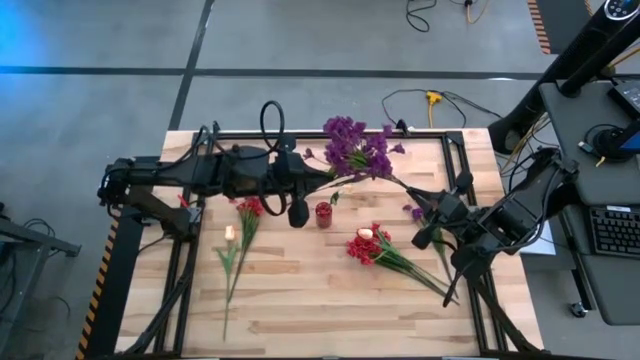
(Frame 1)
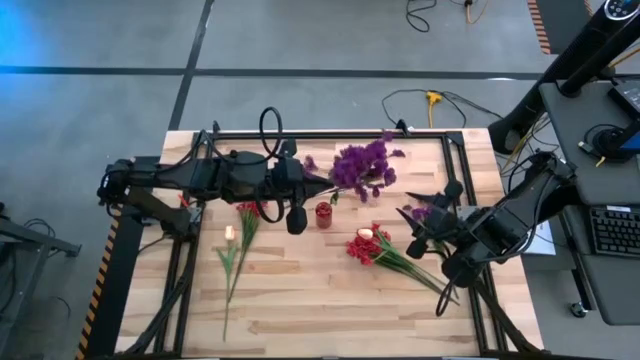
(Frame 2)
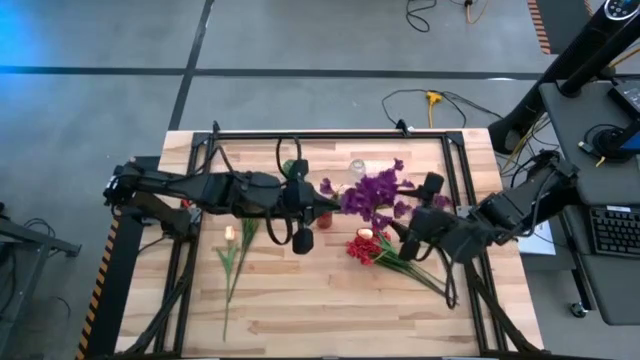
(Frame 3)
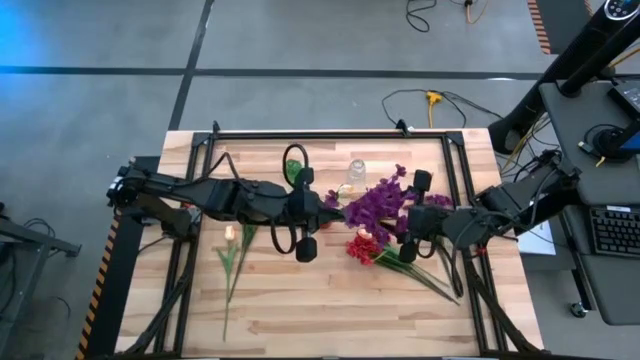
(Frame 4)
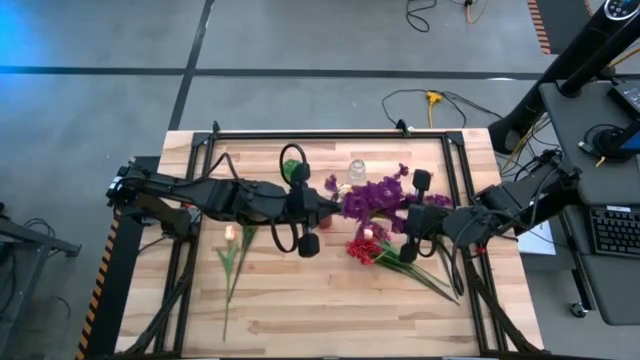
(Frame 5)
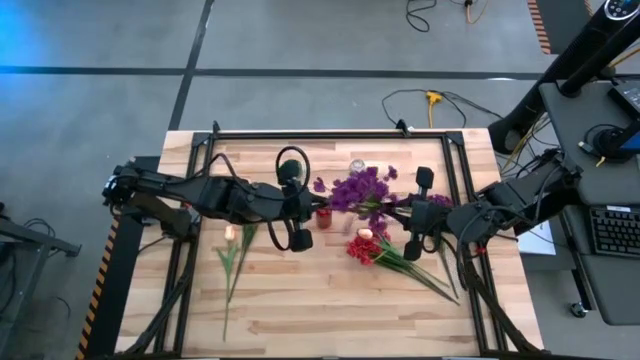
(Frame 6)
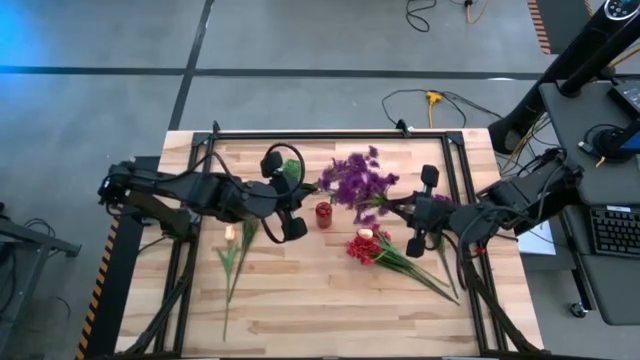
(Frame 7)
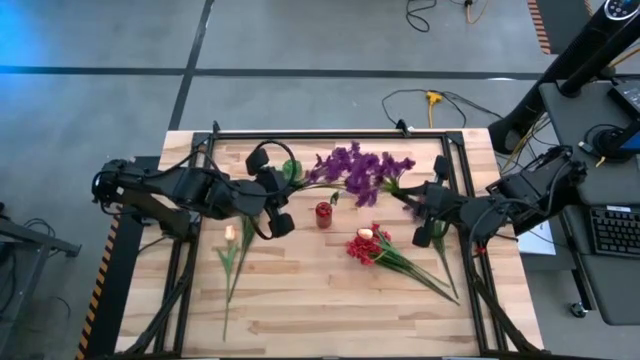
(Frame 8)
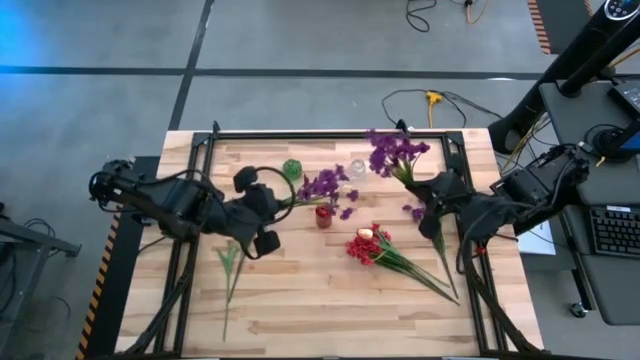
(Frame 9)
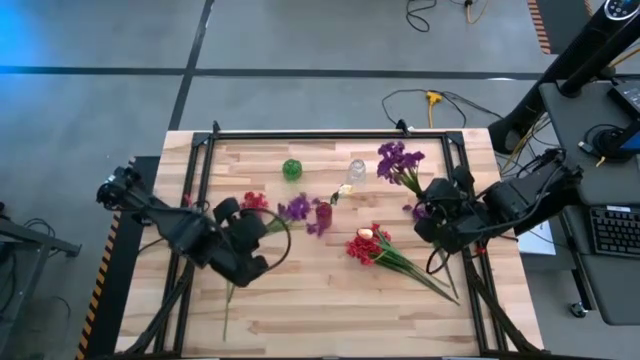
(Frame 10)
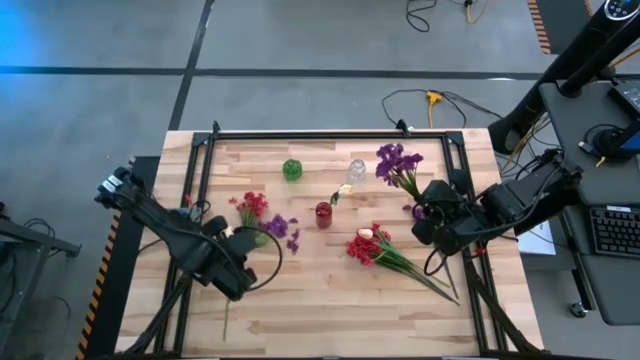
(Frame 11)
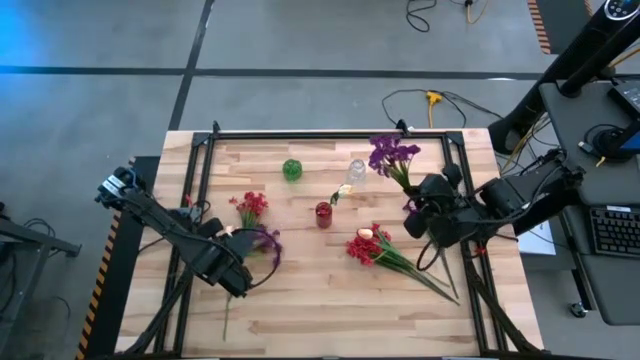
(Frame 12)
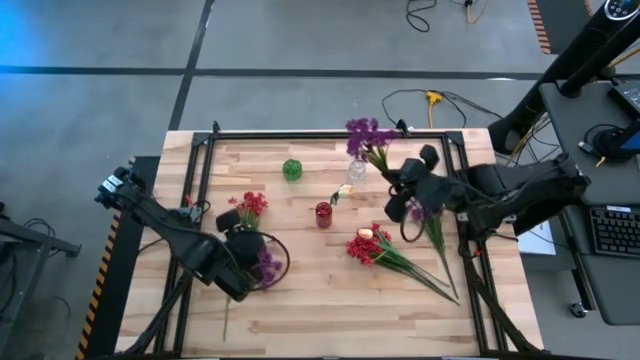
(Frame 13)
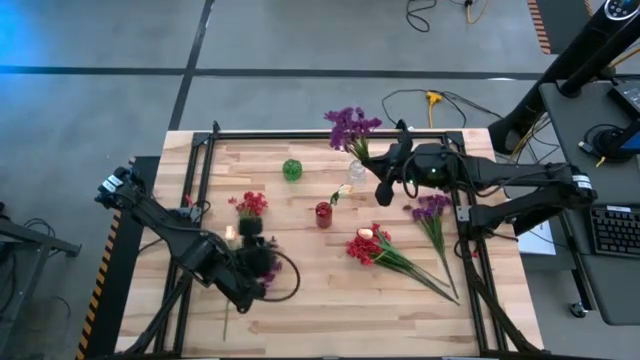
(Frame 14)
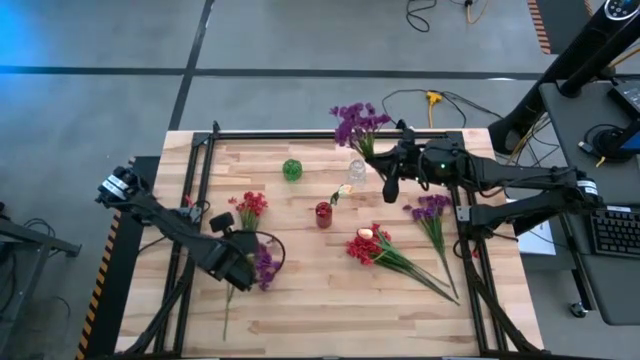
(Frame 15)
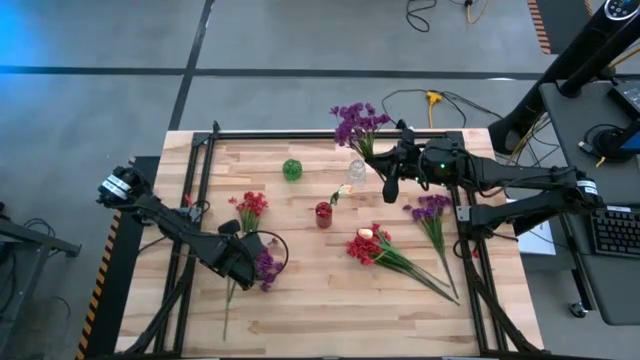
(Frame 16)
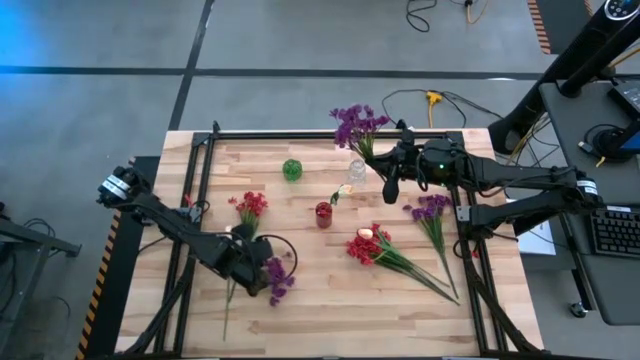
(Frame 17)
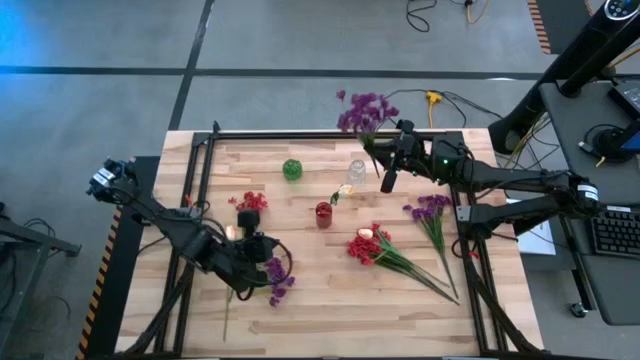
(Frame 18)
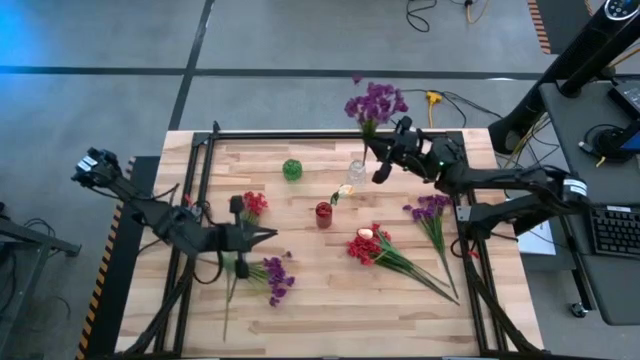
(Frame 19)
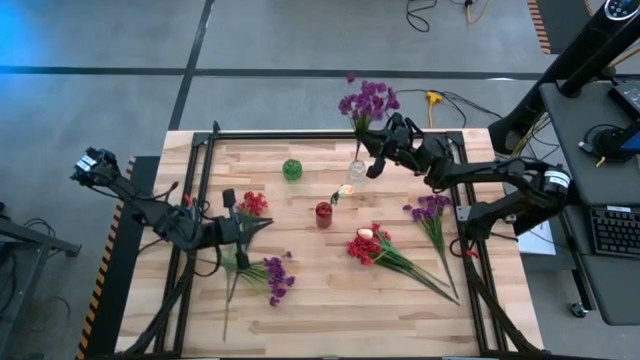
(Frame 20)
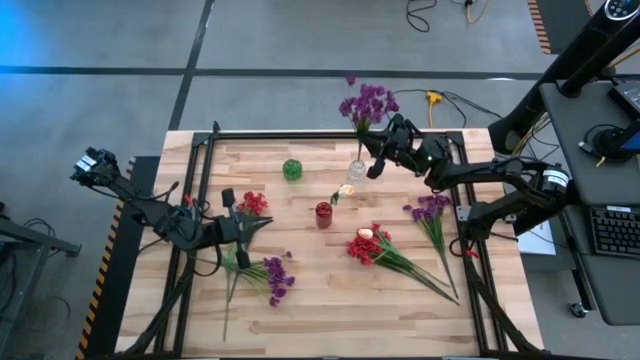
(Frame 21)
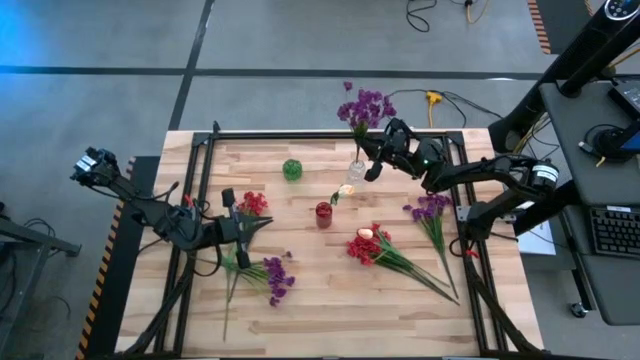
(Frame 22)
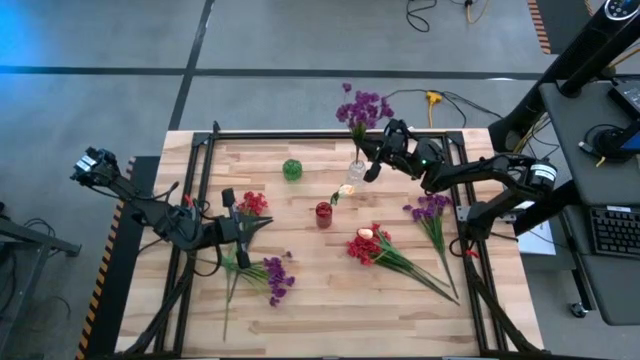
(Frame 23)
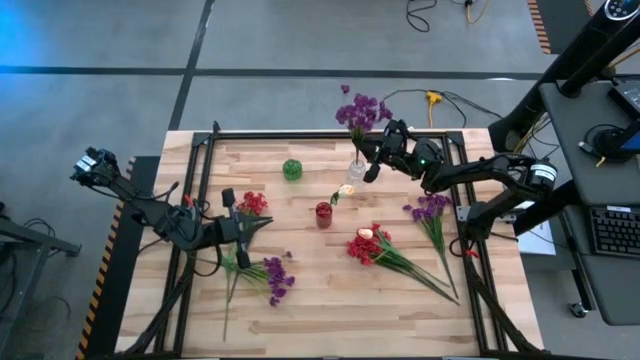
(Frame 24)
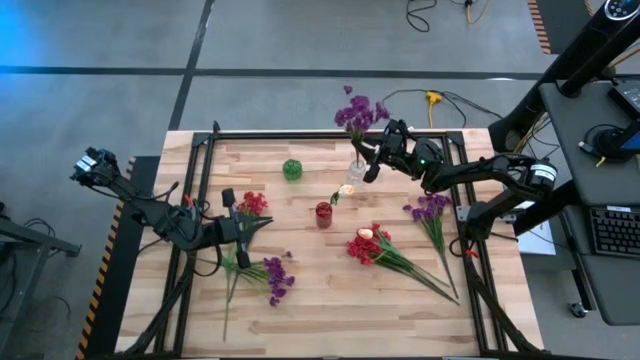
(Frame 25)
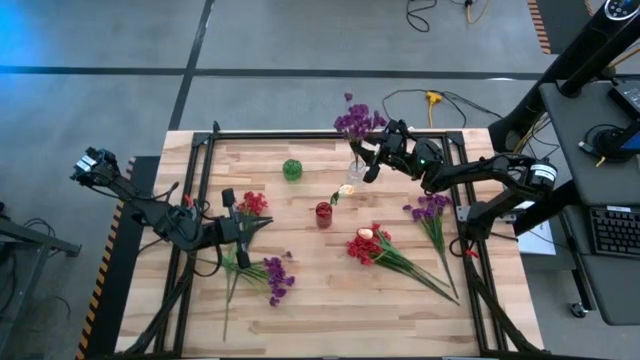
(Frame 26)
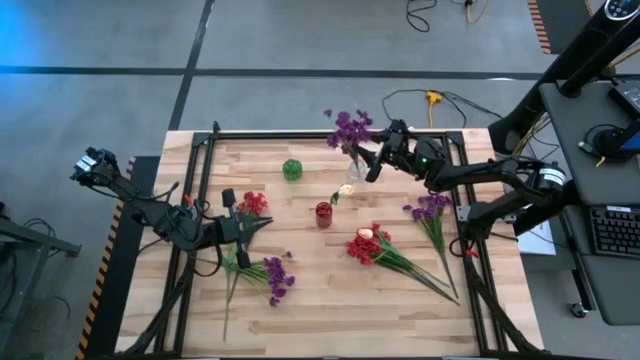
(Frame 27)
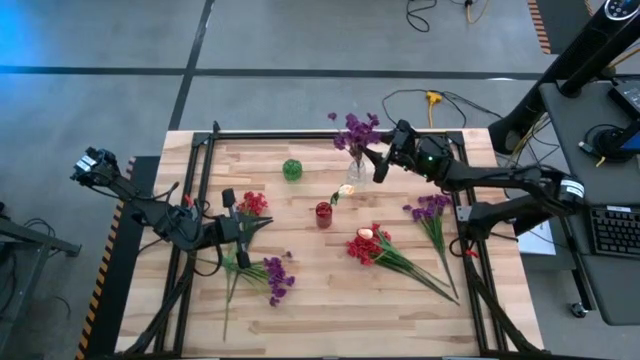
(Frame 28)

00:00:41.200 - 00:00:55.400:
Task: Sort flowers into vase by color
Put the purple flowers into the transparent vase

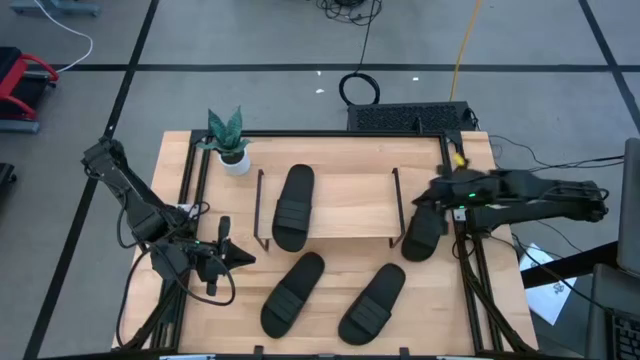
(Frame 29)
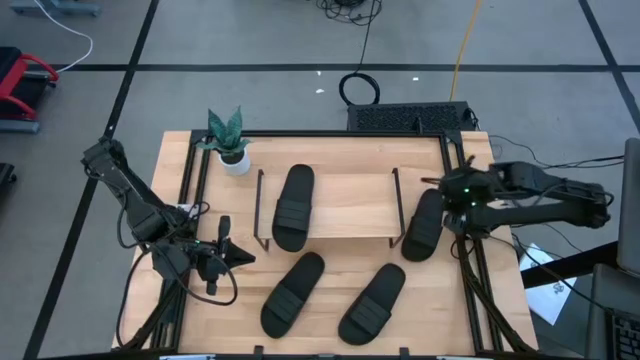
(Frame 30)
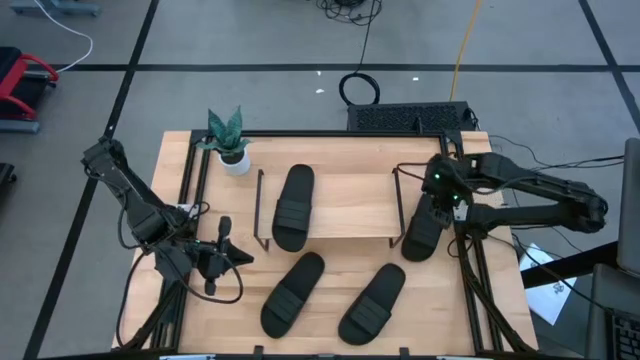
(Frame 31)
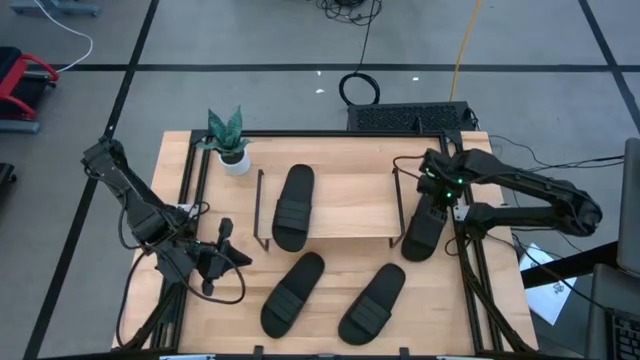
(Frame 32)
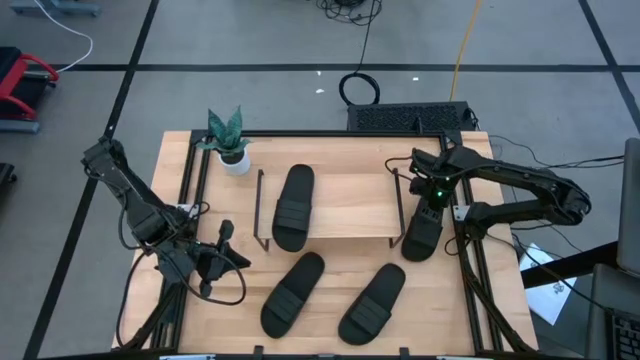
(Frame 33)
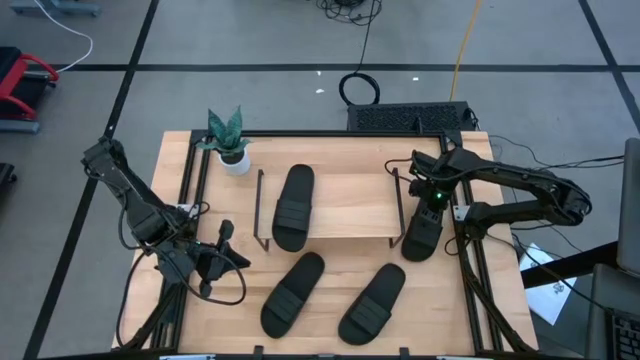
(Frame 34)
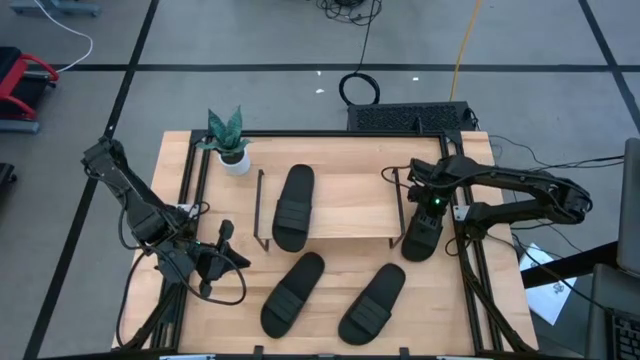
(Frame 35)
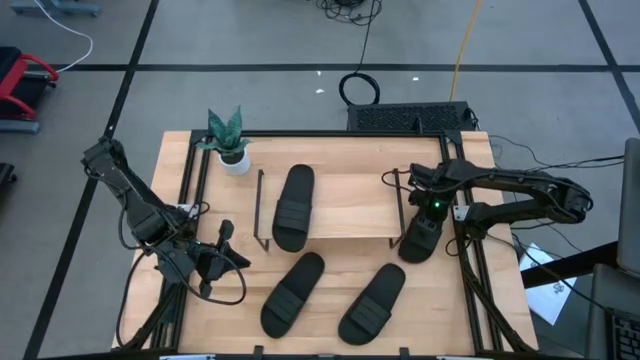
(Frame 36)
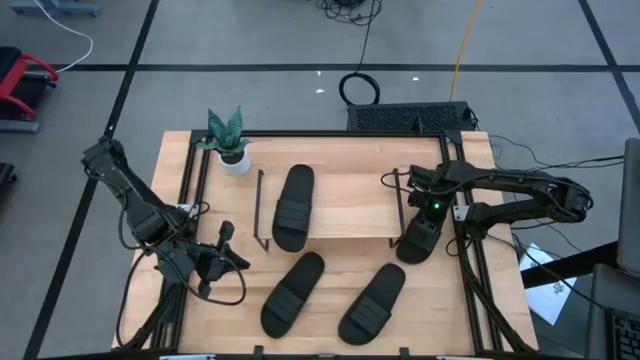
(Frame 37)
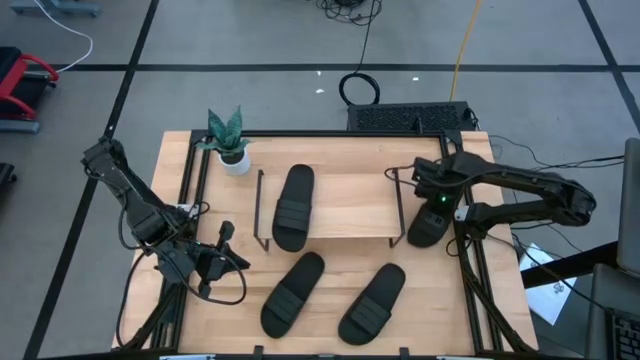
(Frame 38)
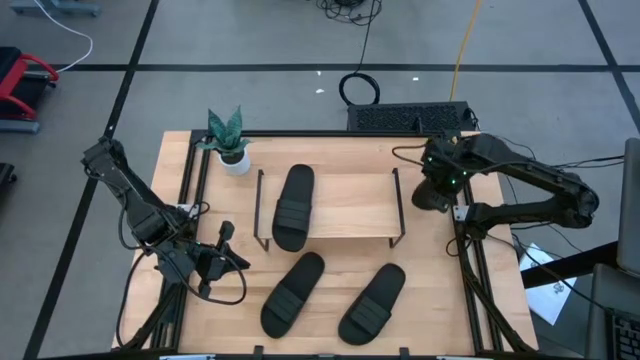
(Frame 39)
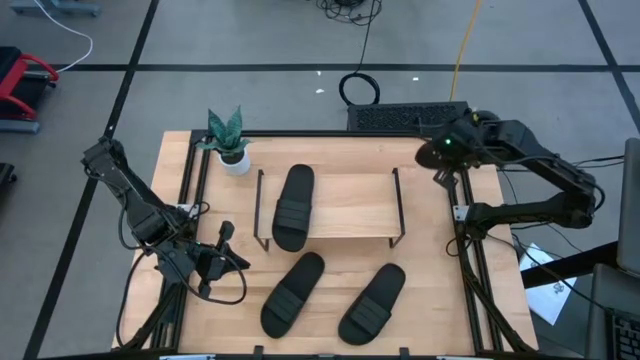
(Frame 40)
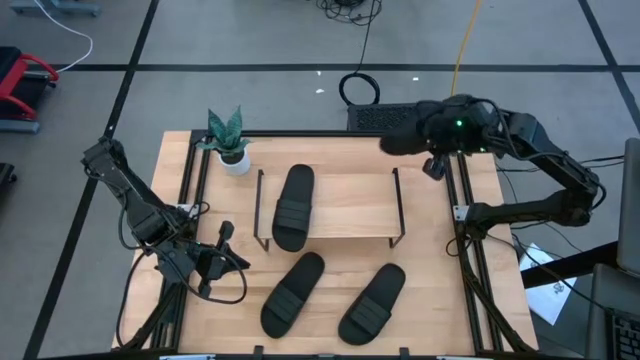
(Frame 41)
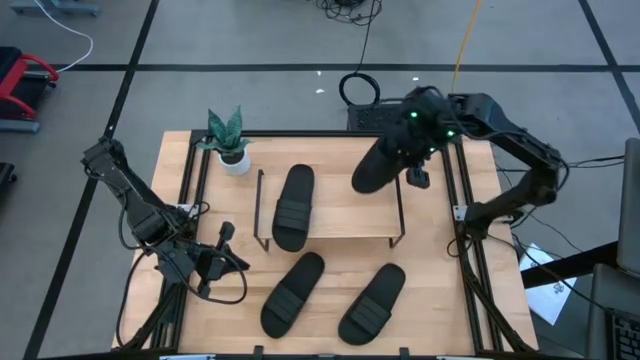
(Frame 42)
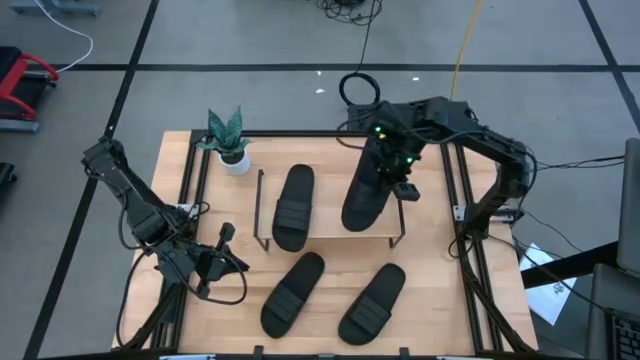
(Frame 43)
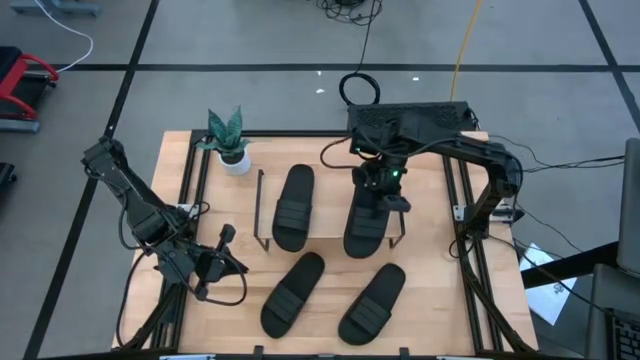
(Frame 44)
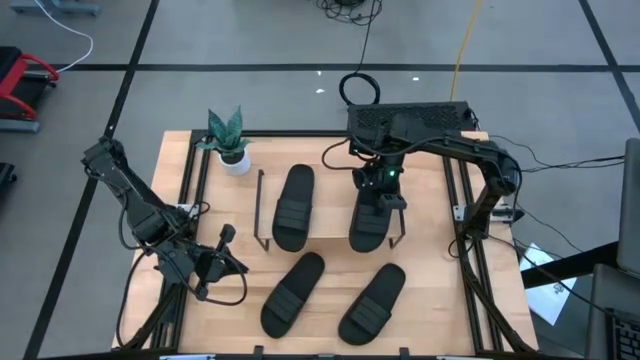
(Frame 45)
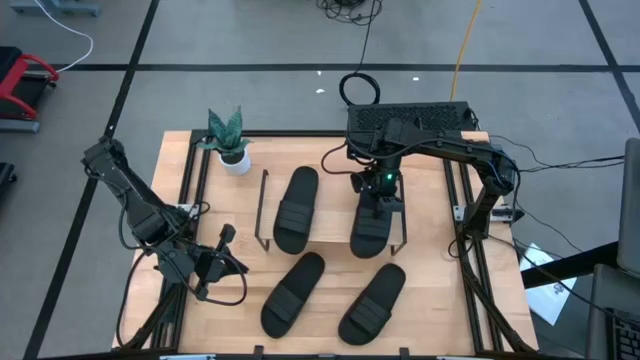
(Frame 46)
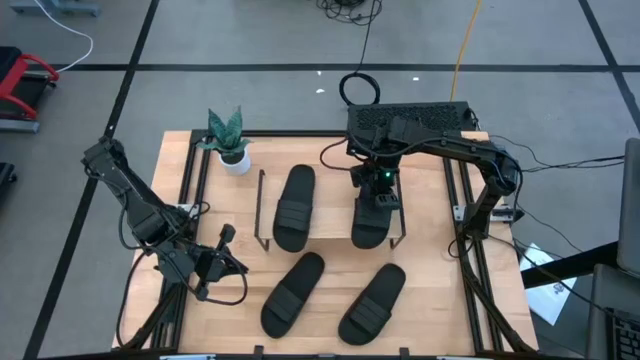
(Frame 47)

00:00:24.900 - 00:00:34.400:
Task: Pick and place slides into the shelf
Put the black slipper on the shelf
